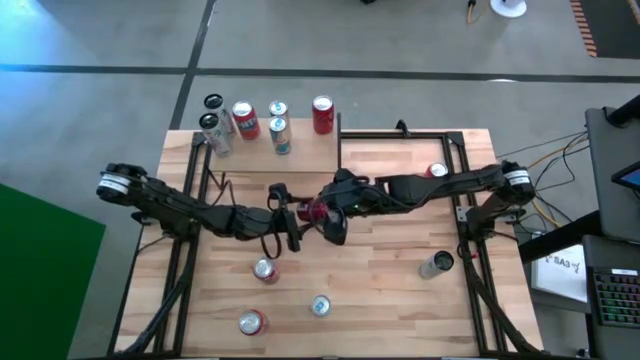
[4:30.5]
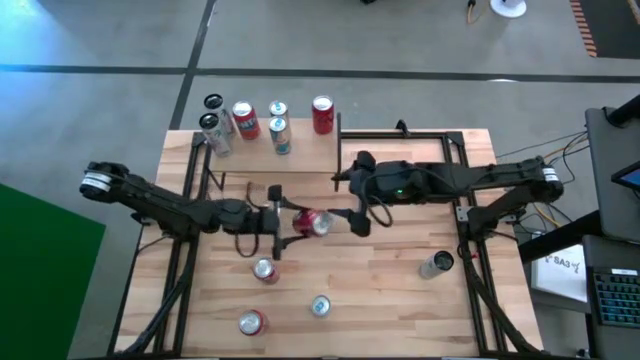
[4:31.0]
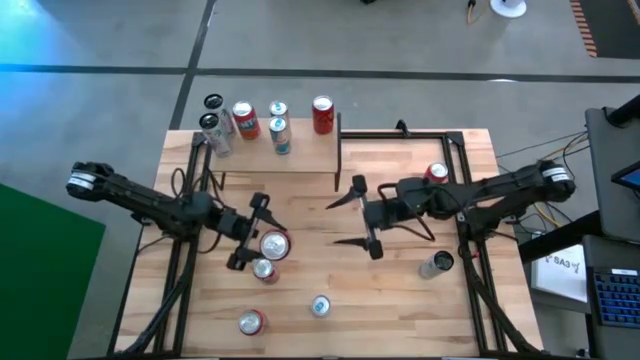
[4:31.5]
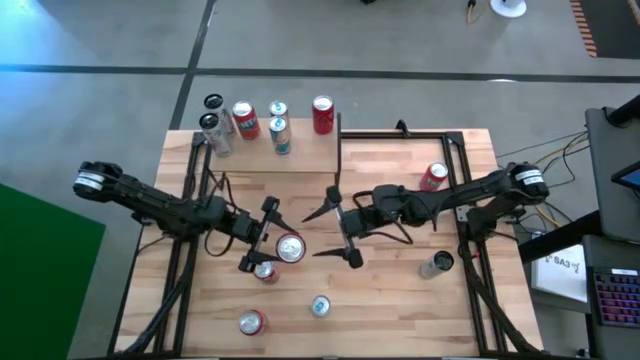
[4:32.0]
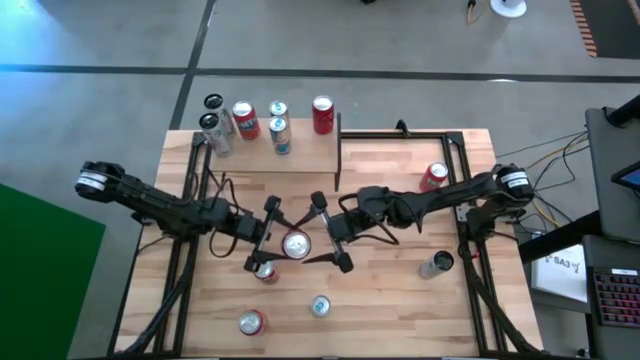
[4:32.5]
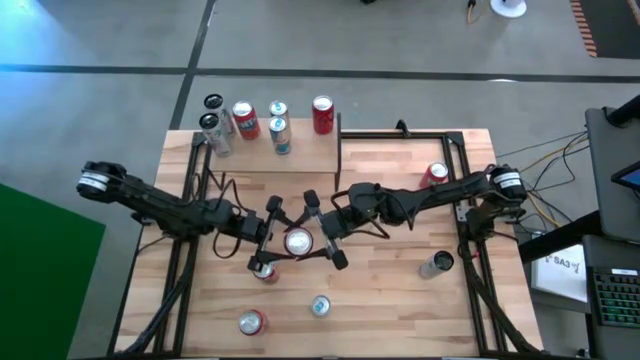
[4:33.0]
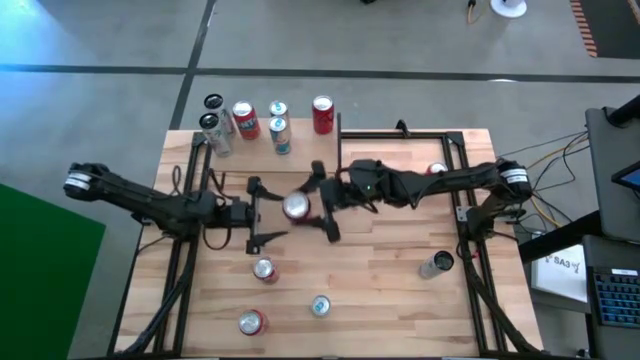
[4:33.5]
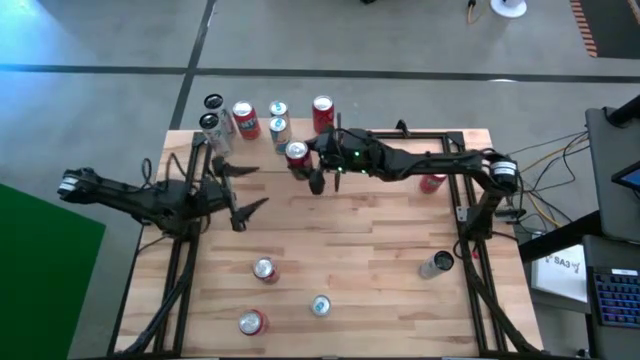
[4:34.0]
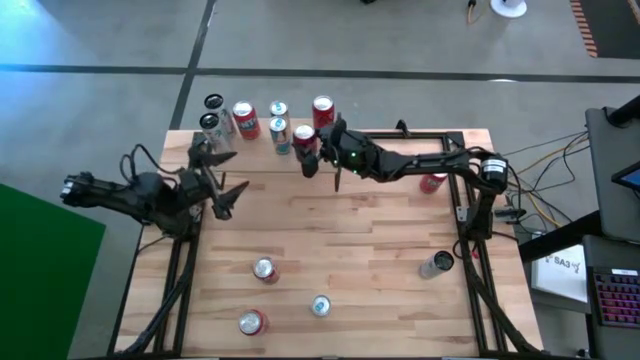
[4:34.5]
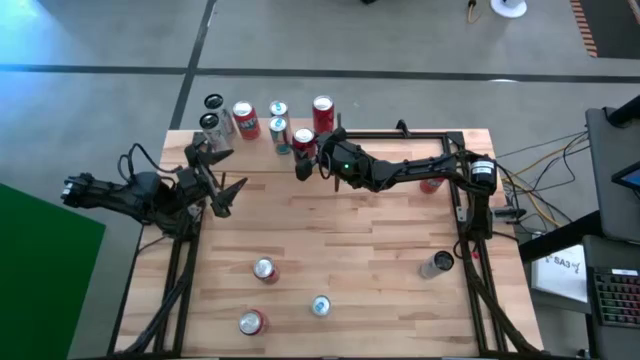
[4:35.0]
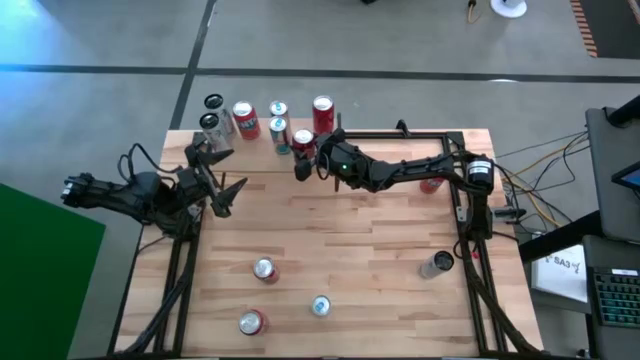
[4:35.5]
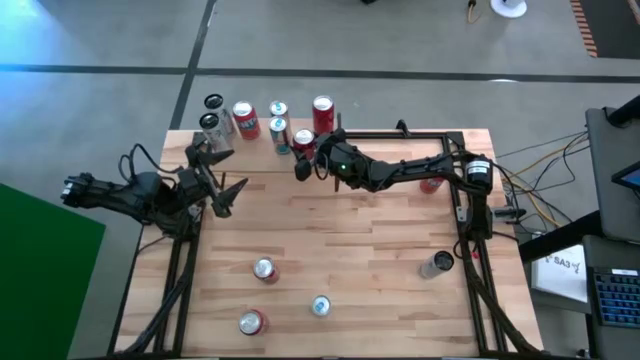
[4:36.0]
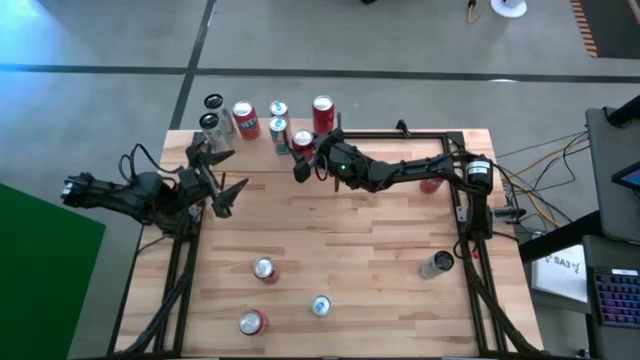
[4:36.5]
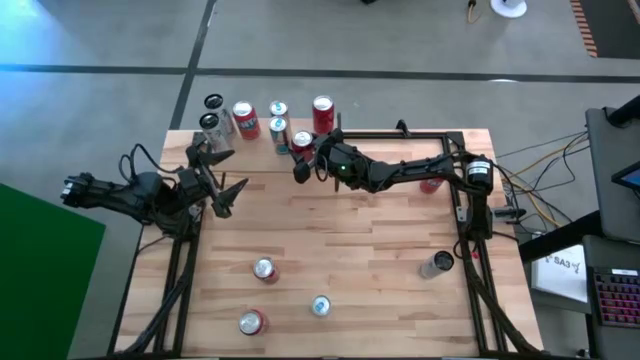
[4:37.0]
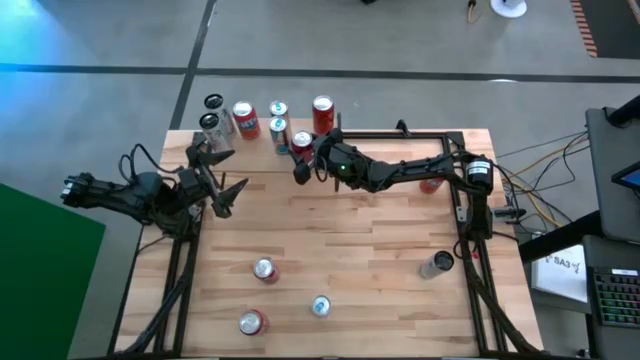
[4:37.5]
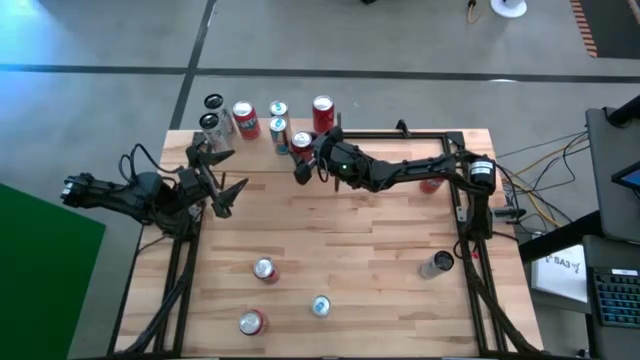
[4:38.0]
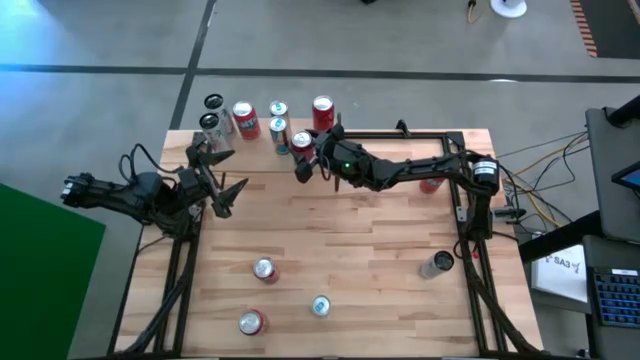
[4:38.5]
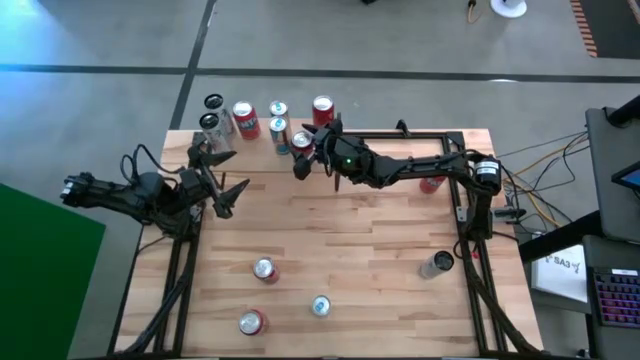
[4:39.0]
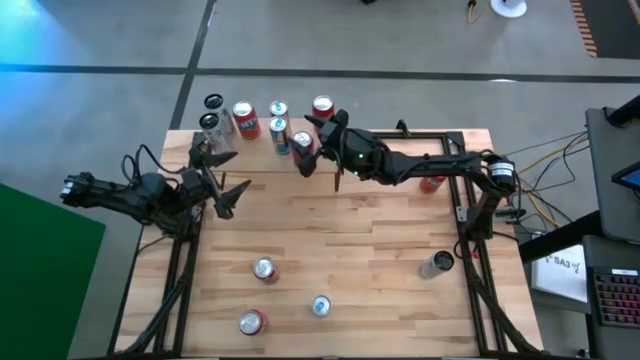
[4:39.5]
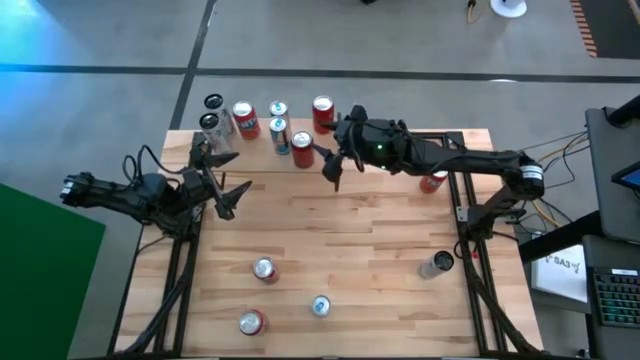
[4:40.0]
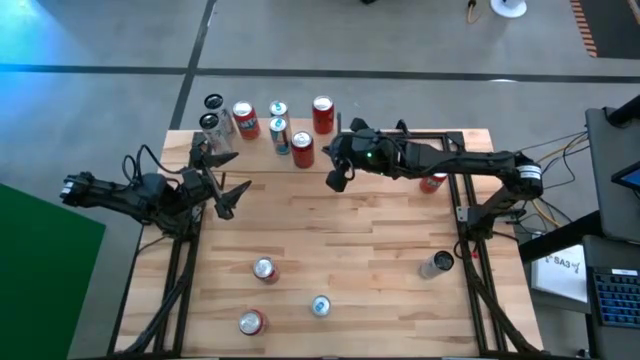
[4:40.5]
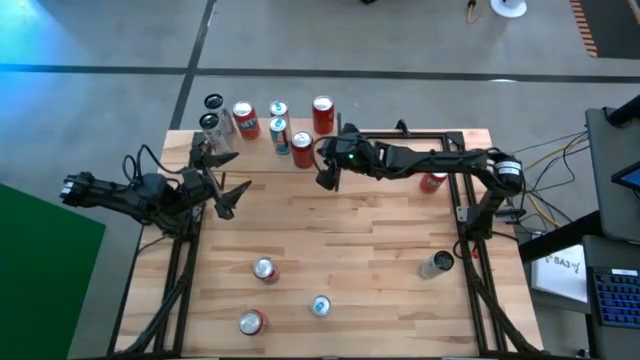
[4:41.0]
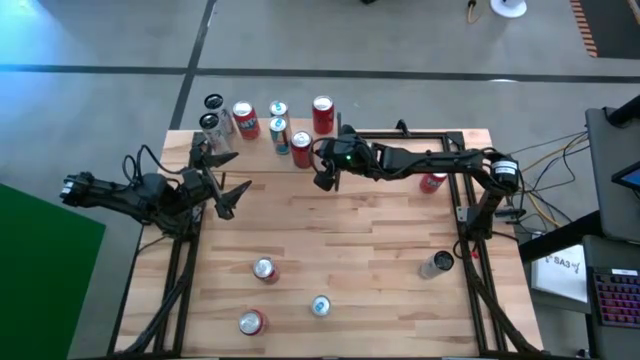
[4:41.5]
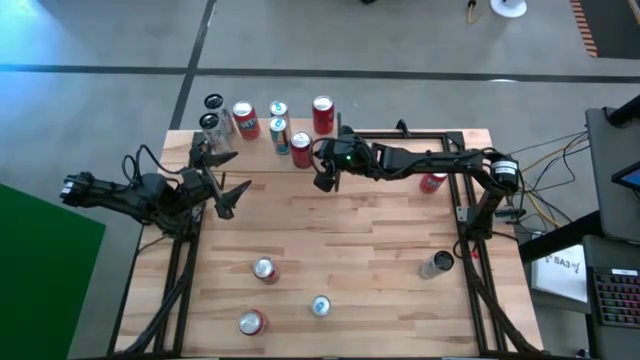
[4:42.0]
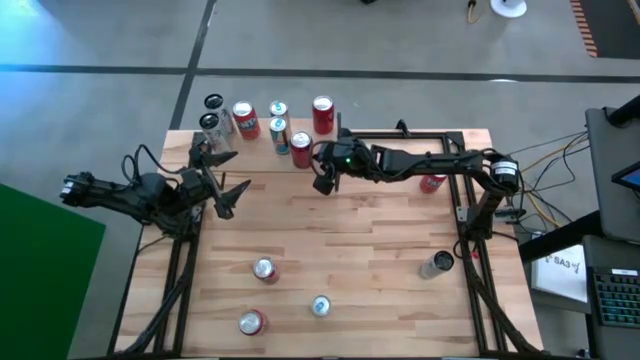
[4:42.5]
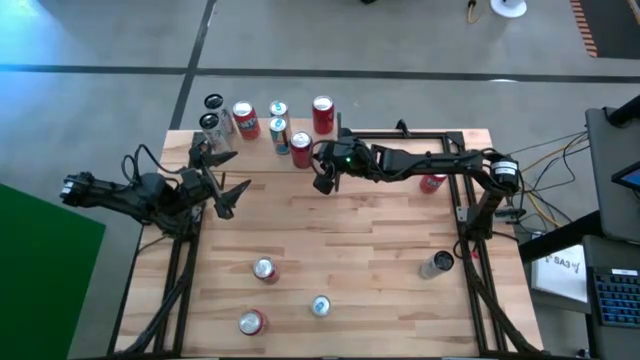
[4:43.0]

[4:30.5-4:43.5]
Task: Place canned beverage on shelf
Put the red black soda can on the shelf aligned with the other red black soda can

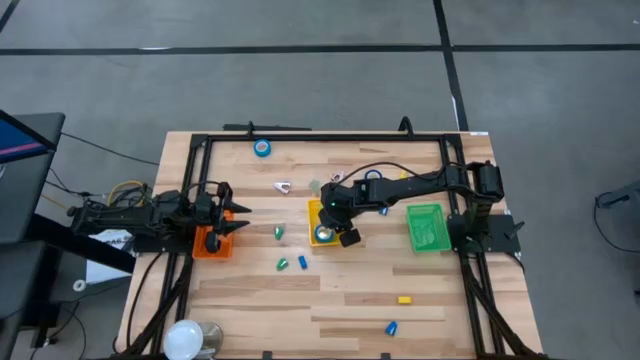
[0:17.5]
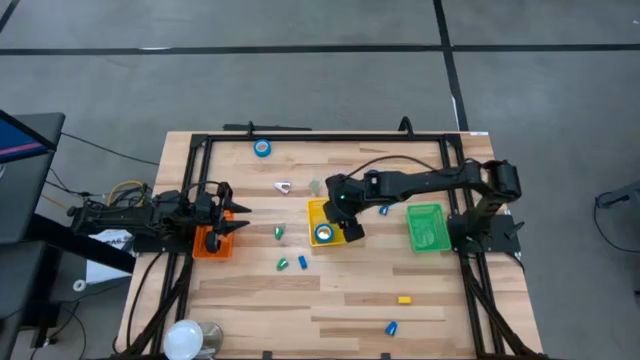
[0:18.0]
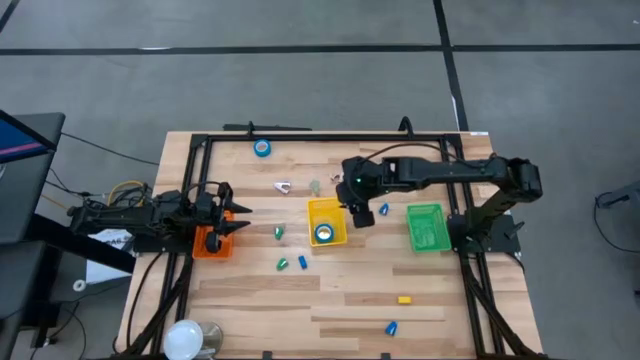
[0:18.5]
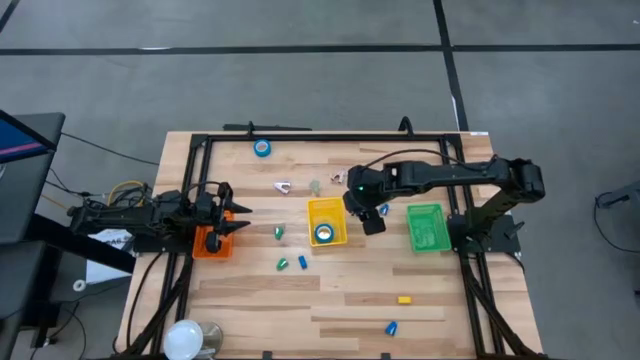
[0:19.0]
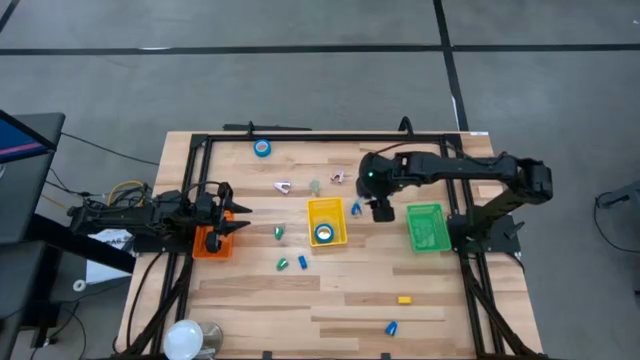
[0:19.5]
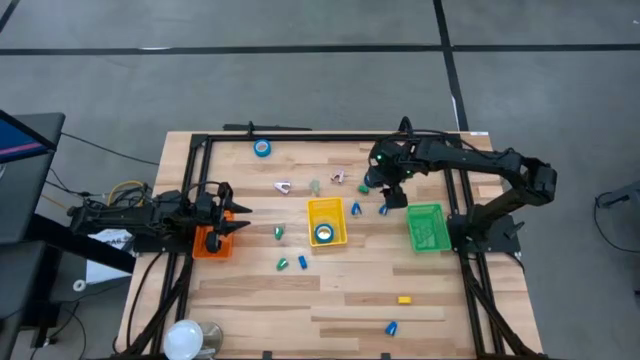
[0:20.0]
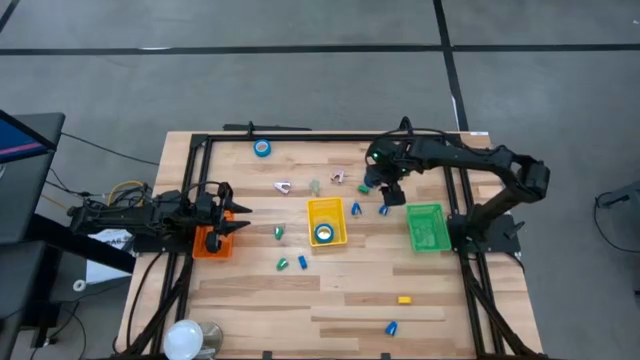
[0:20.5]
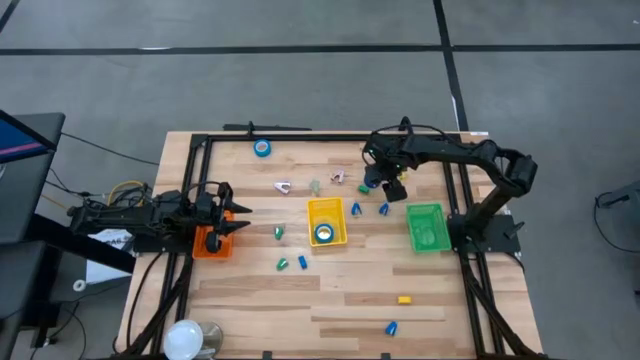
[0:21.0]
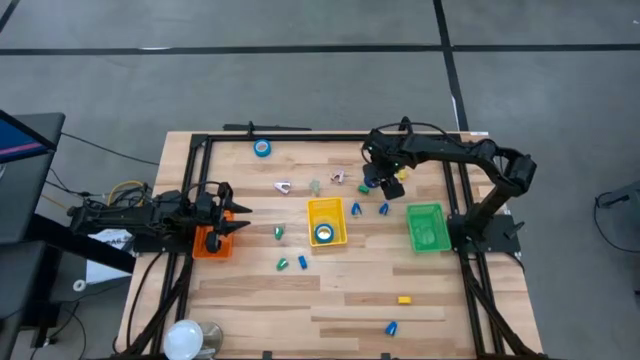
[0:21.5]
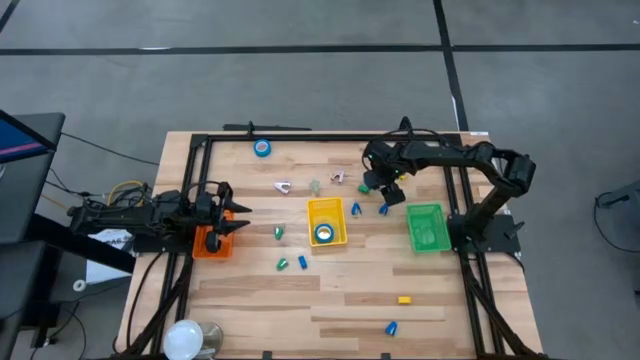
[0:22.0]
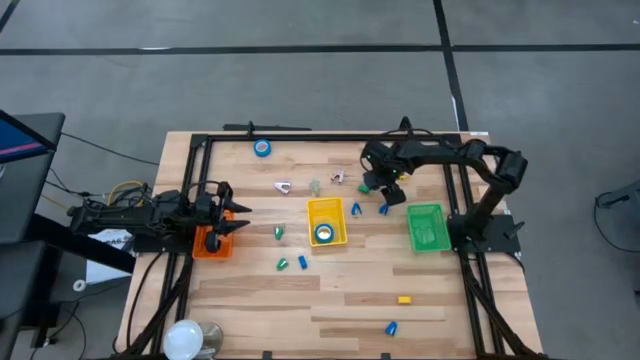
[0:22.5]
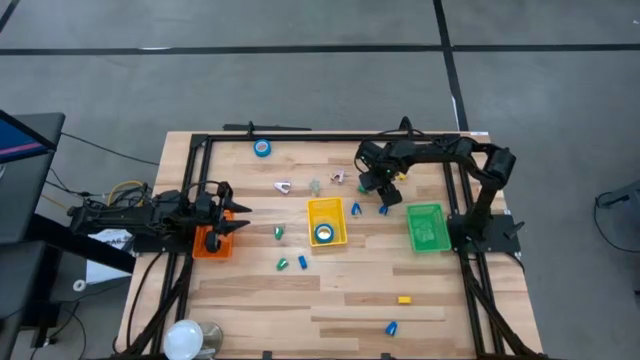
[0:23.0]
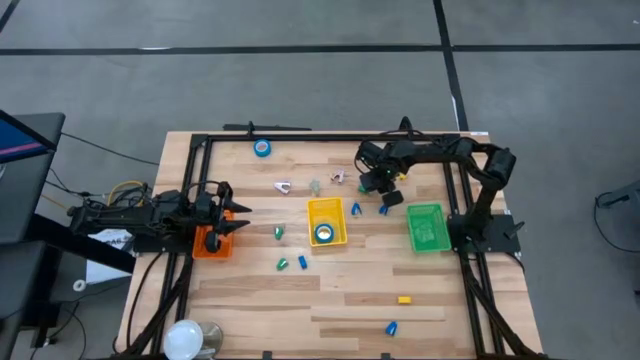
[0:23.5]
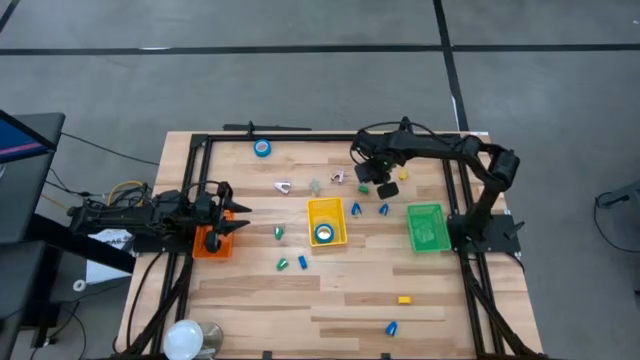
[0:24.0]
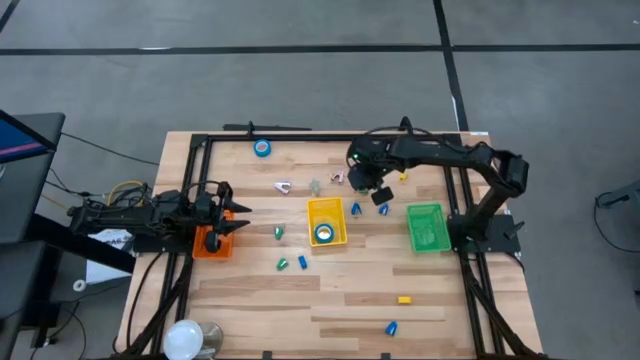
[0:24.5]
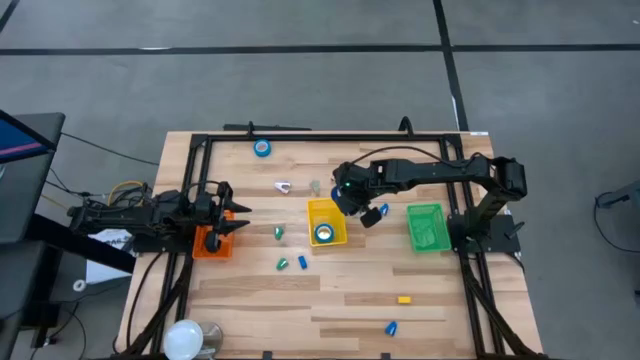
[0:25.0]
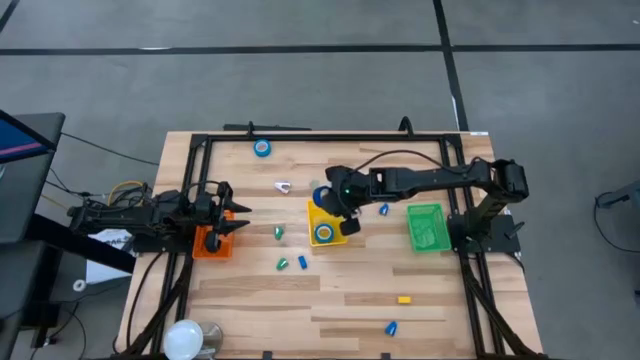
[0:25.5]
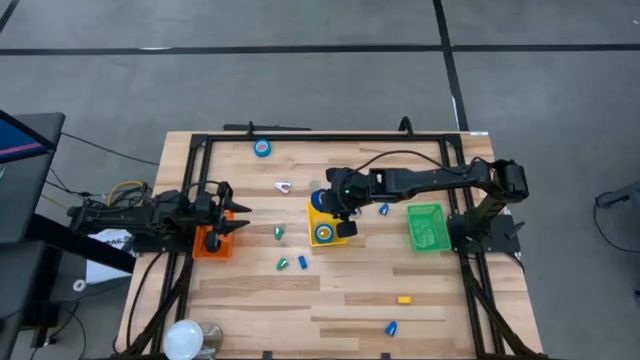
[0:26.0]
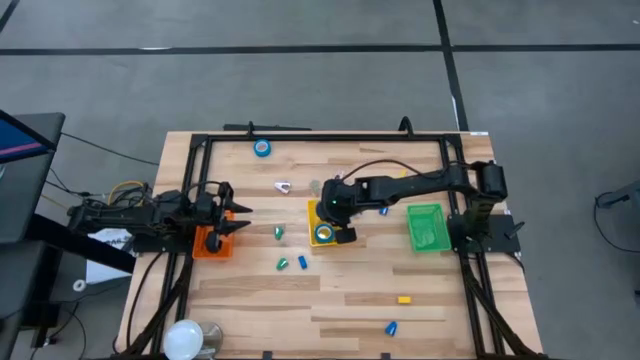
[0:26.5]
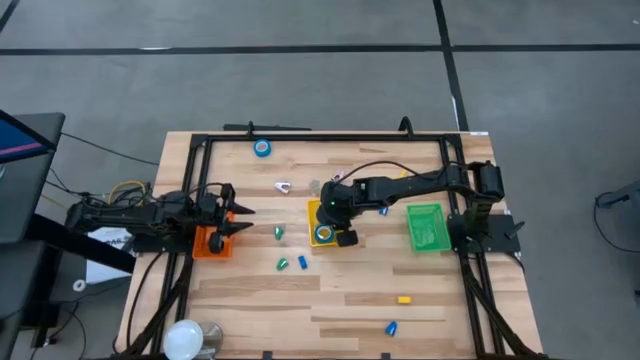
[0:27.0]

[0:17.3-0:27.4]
Task: Pick and place Stapler, Stapler remover, tape
Put the blue tape into the yellow basket
